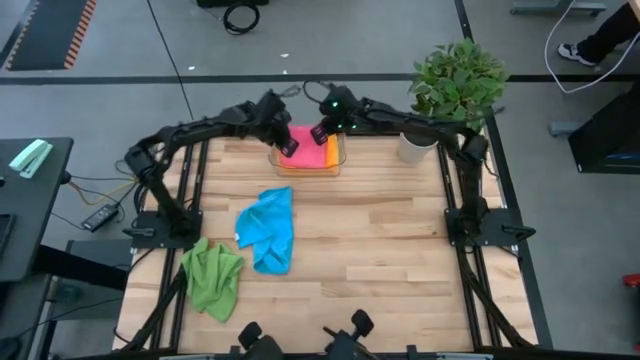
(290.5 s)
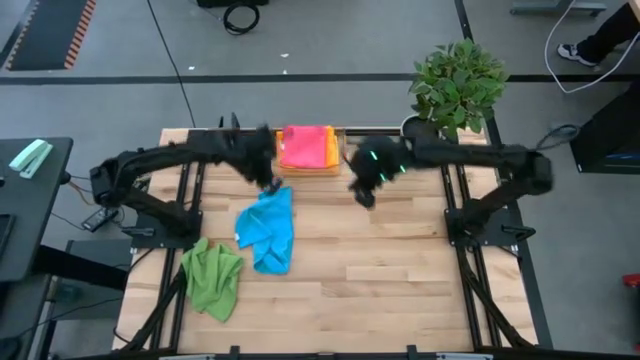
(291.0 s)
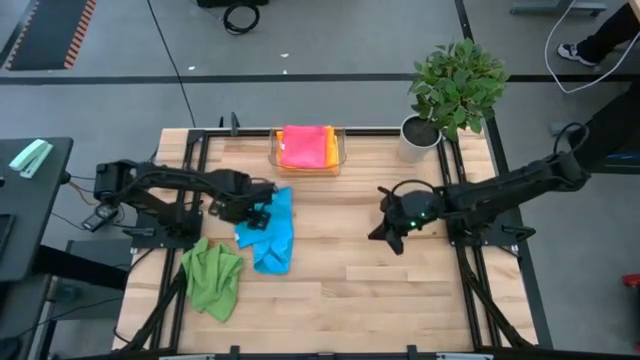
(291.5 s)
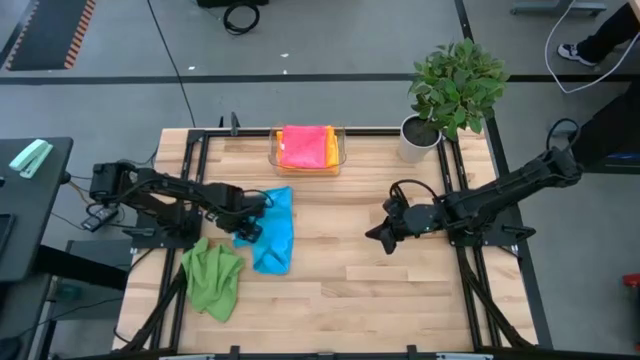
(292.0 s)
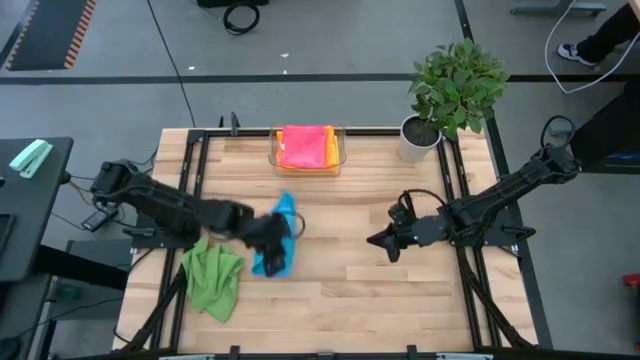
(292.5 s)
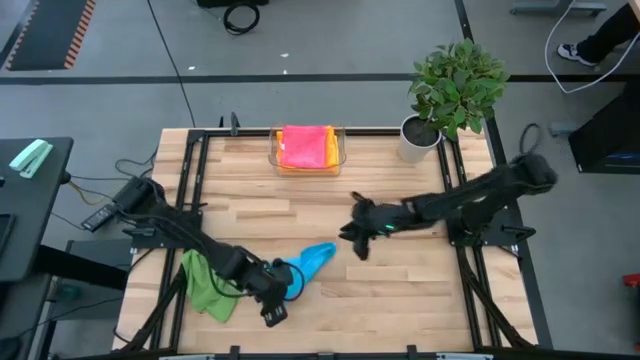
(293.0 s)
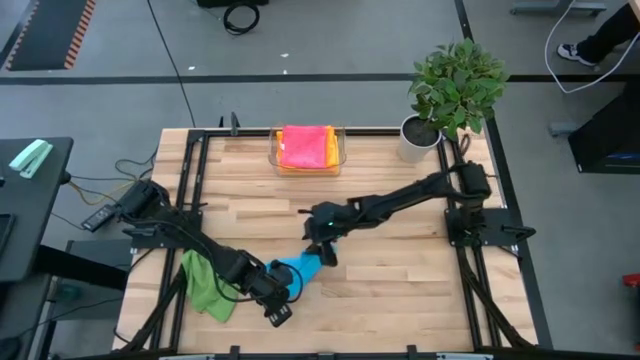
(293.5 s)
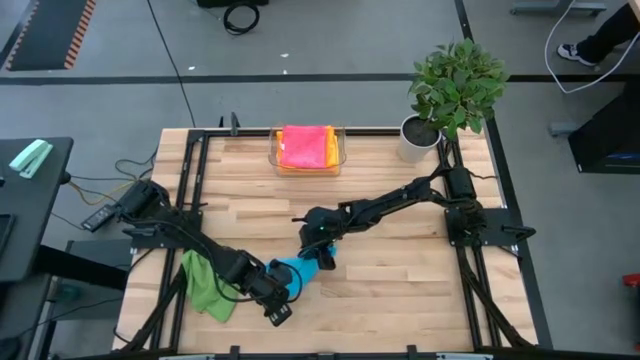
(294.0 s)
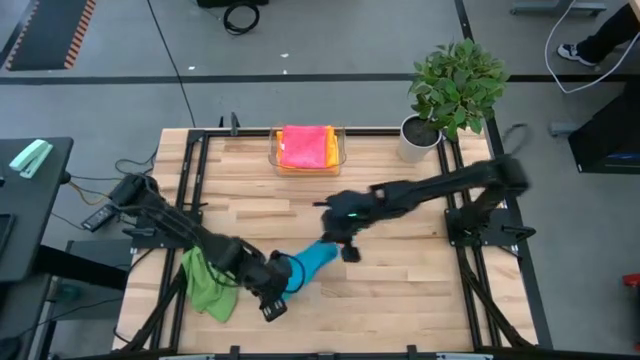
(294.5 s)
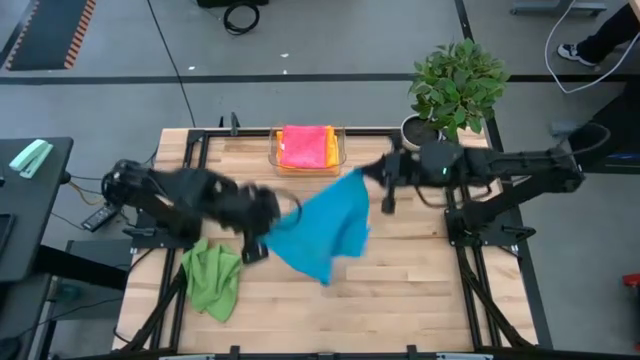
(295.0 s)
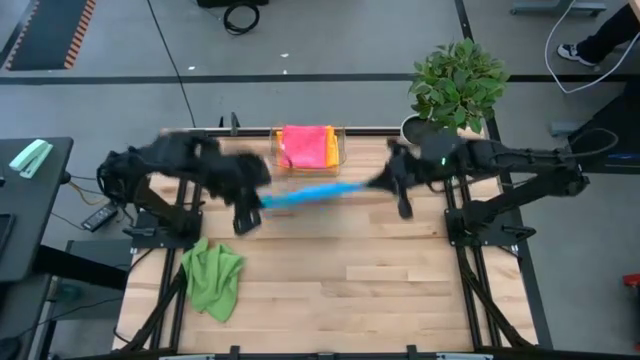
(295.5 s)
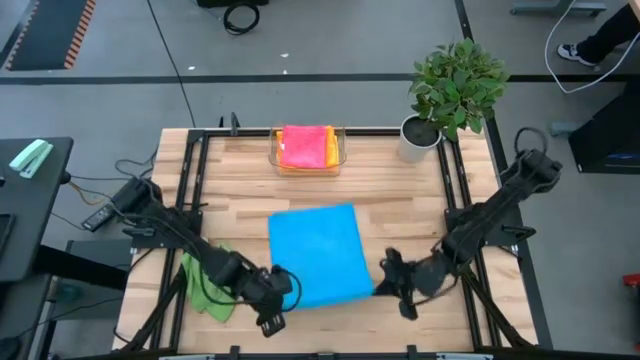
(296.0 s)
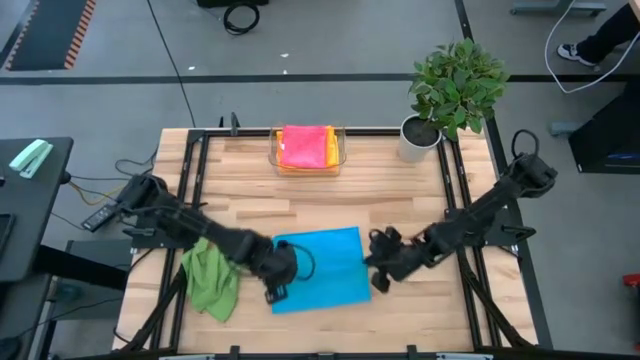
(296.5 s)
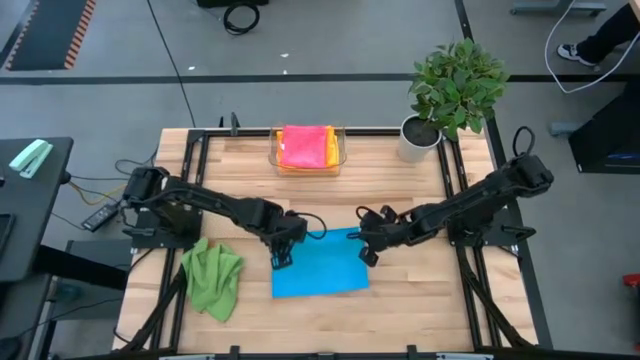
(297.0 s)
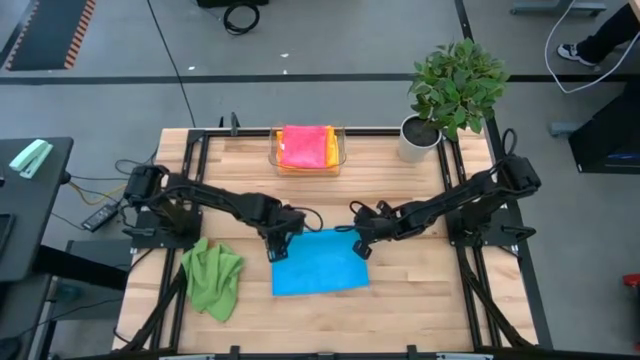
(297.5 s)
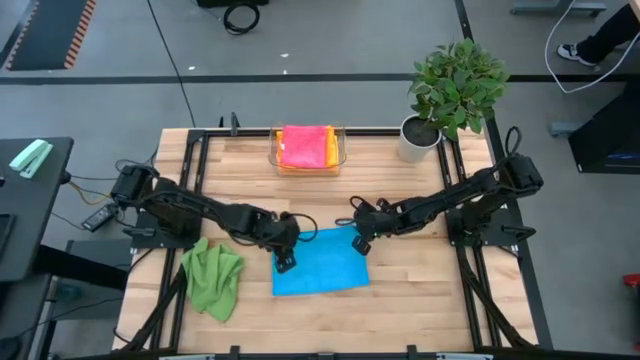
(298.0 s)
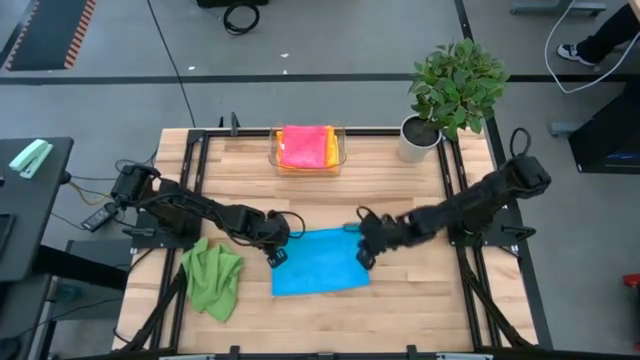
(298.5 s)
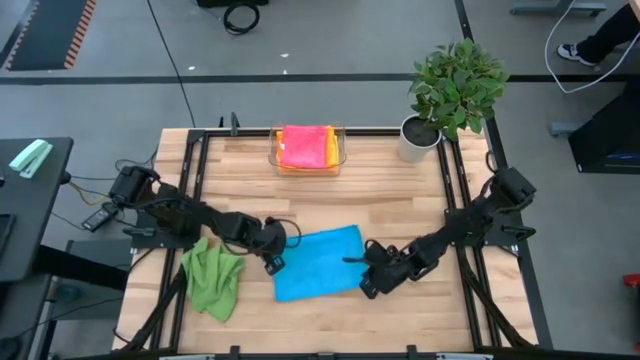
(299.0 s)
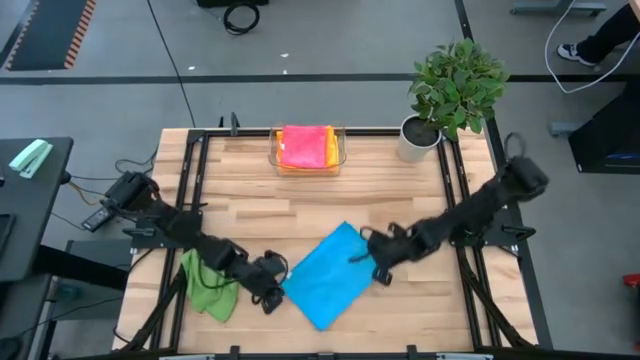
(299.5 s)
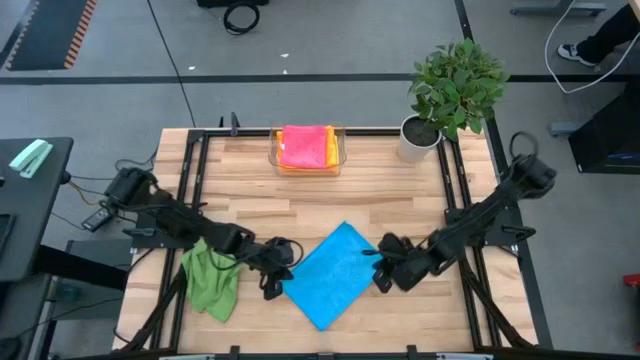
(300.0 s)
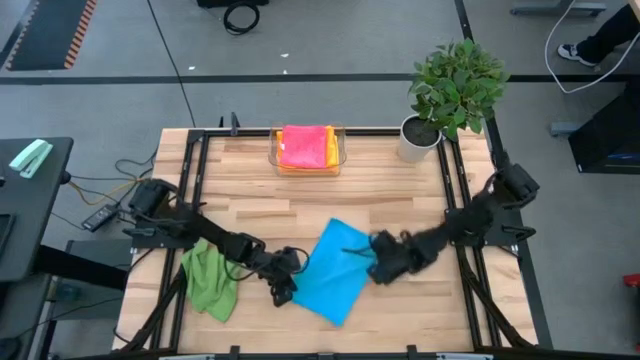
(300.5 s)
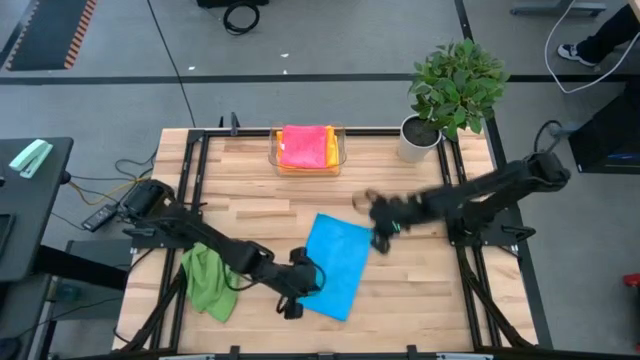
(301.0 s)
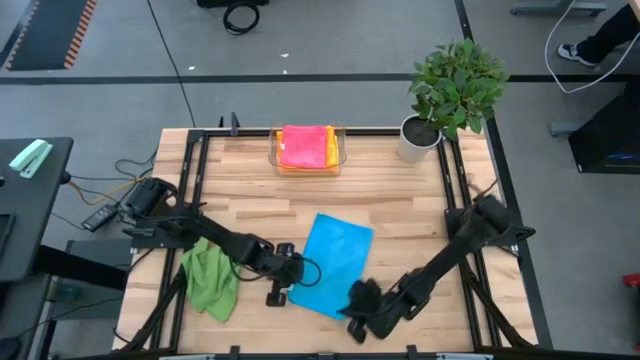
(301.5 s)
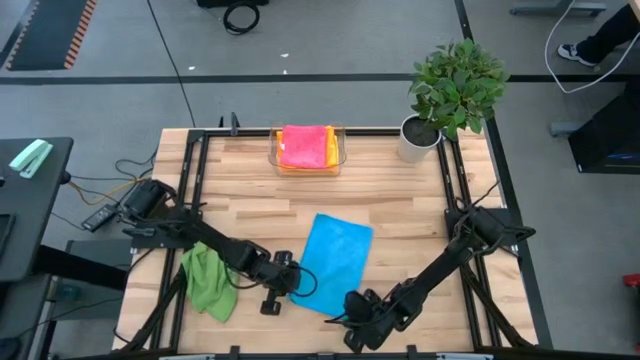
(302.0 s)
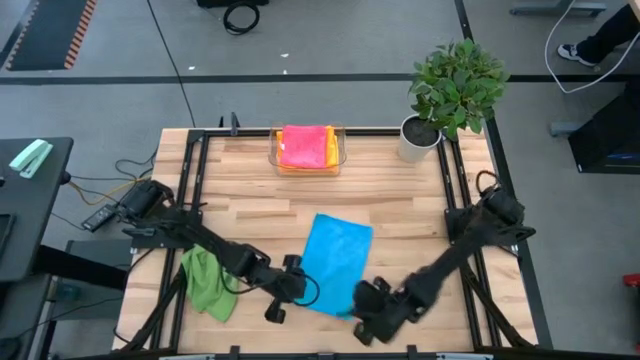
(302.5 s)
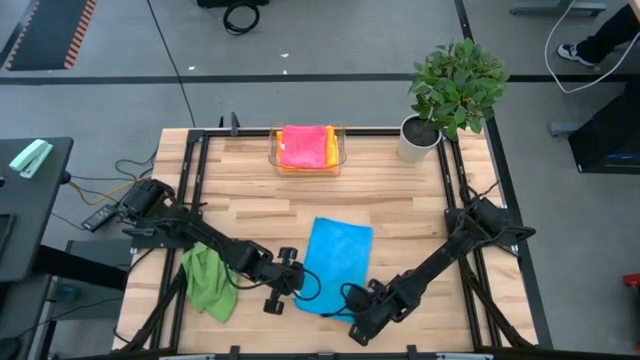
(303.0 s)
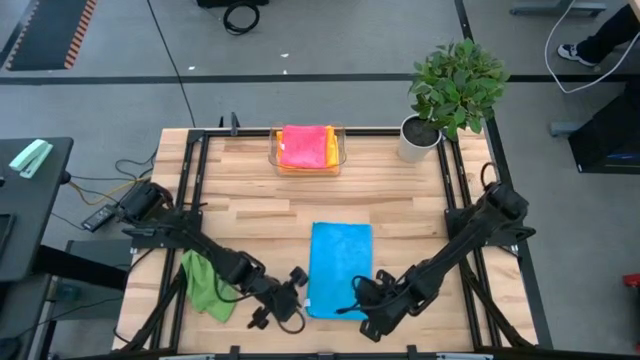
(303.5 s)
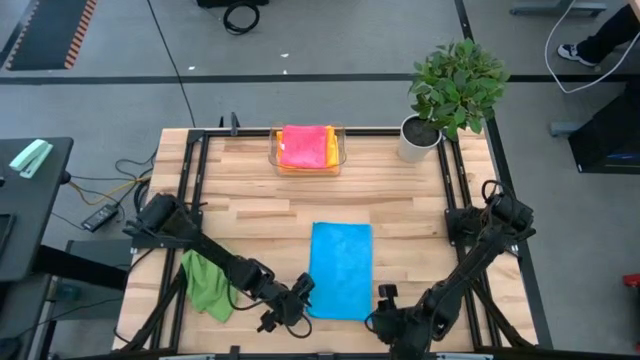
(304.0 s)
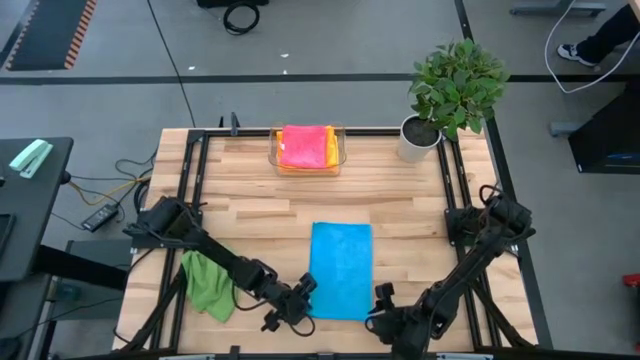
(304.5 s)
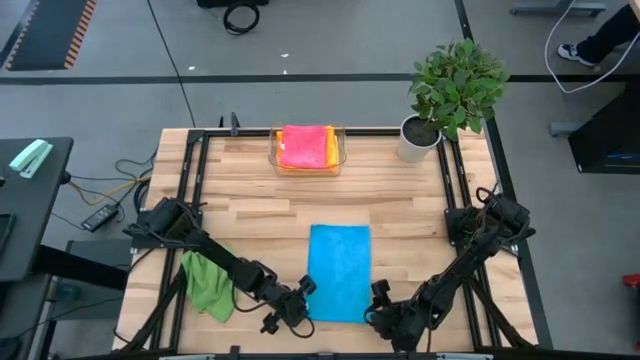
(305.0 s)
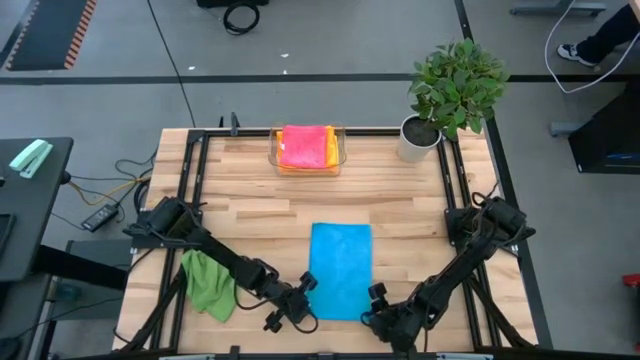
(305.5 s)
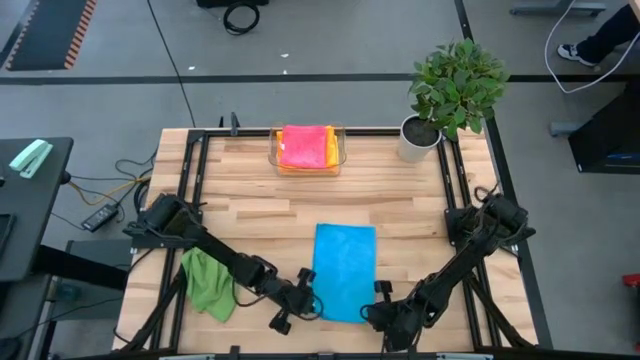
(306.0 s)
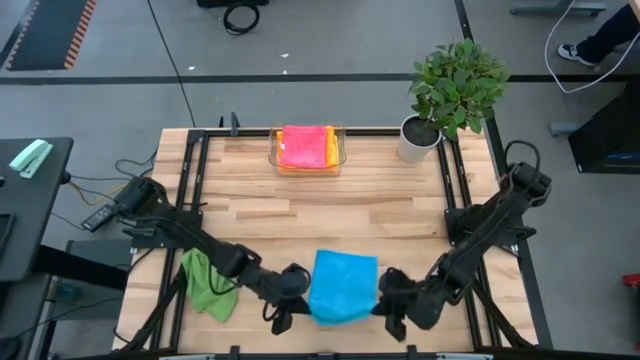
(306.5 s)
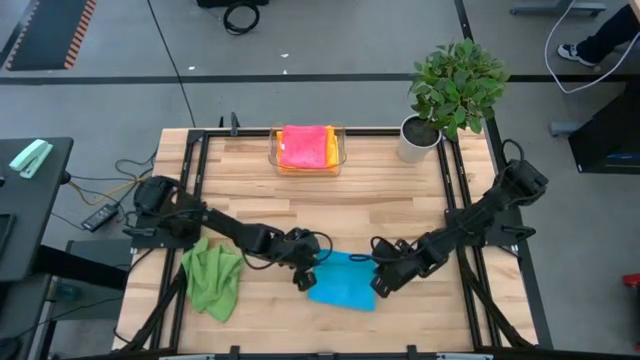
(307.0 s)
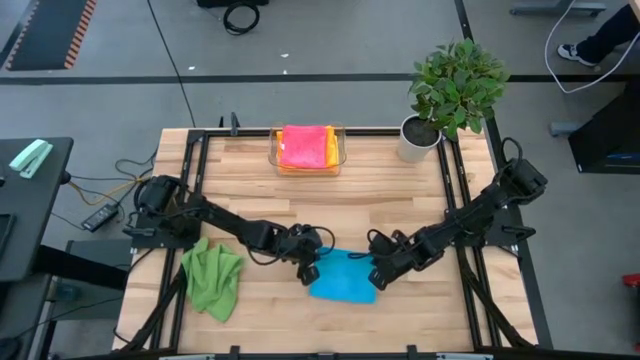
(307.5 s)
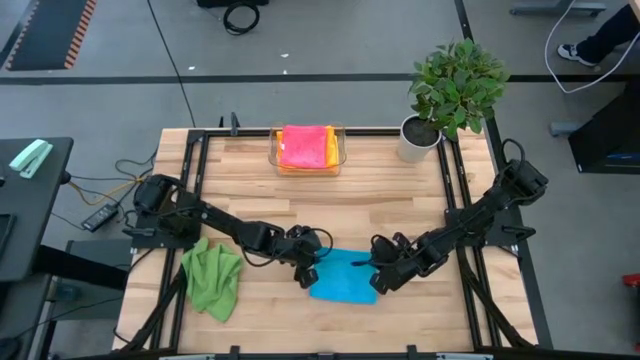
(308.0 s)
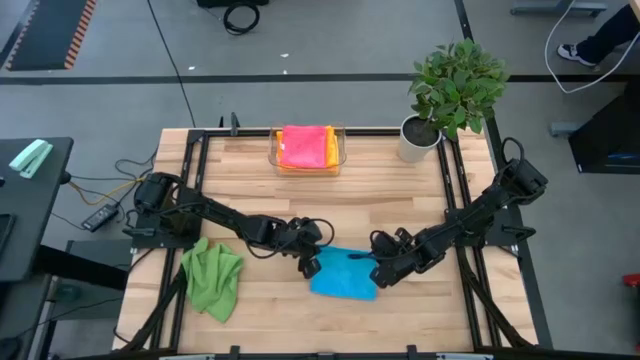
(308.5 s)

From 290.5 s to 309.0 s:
Task: Fold microfiber towels
Fold the blue microfiber towel

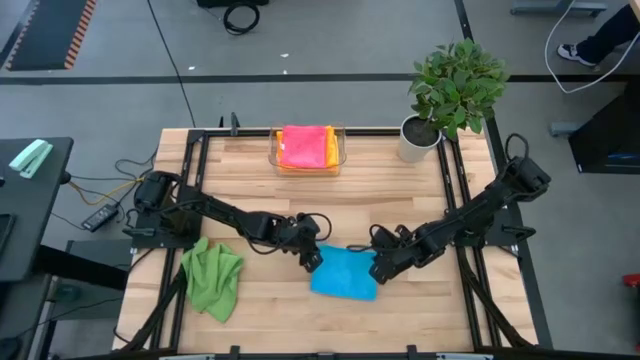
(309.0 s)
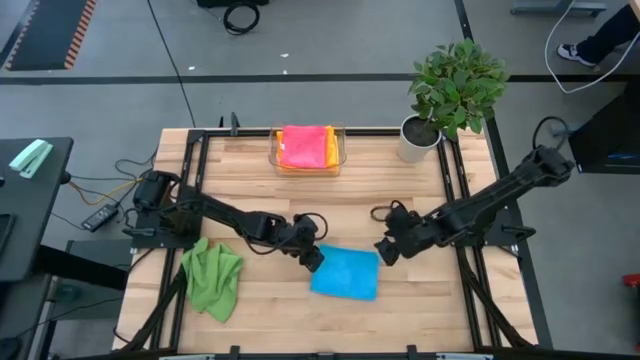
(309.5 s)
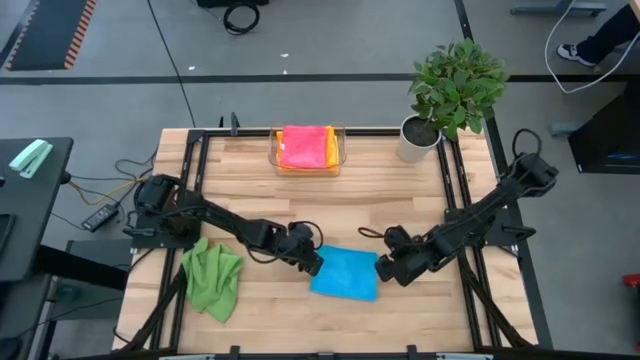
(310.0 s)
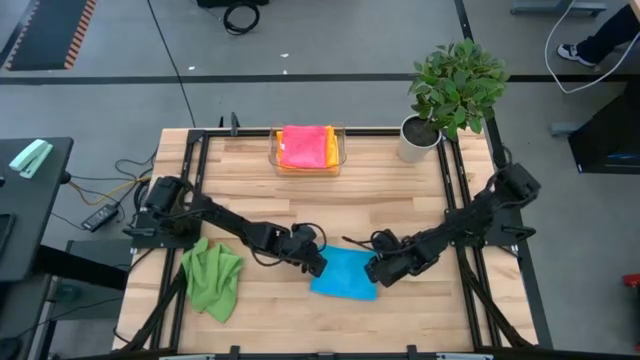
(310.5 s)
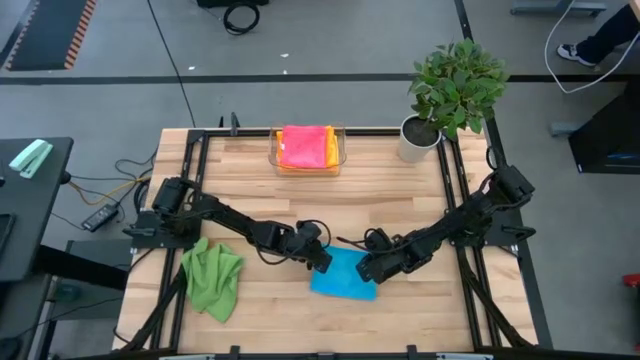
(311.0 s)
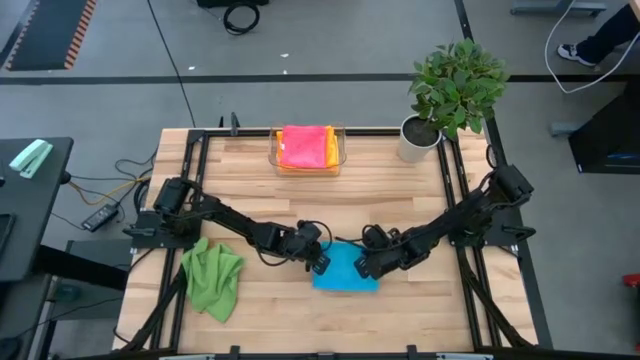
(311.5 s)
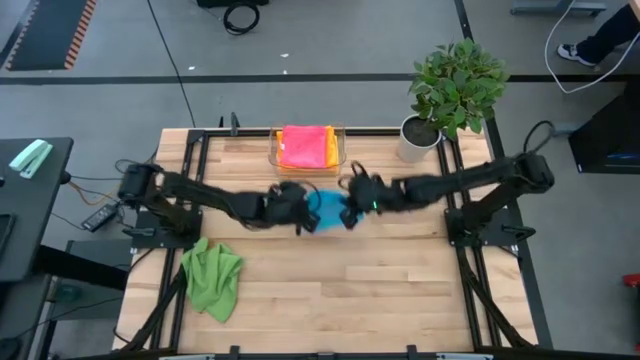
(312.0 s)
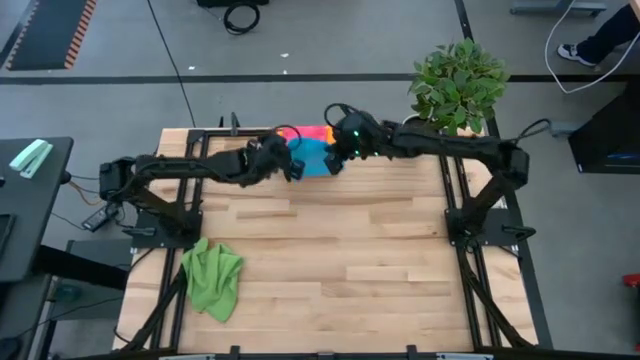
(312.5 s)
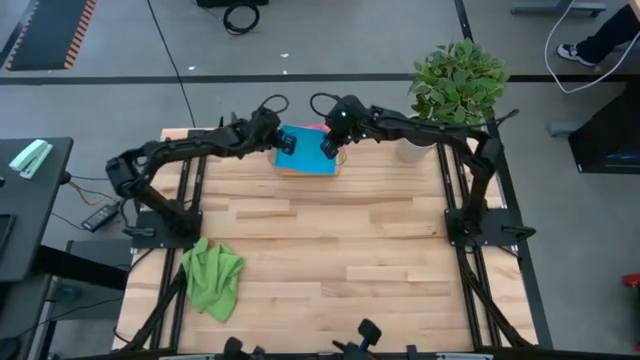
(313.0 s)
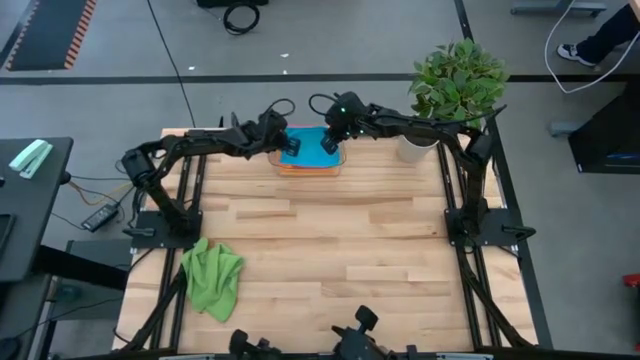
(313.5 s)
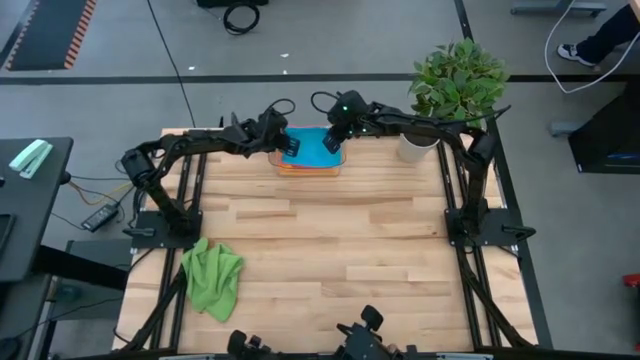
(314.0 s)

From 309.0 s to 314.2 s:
Put the blue microfiber towel into the transparent bin
